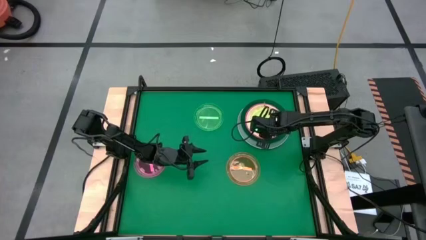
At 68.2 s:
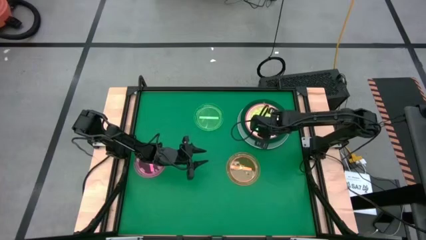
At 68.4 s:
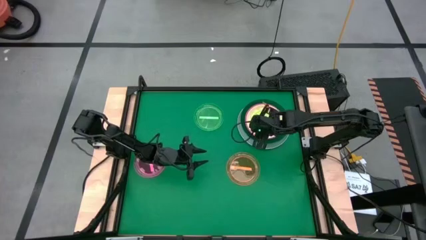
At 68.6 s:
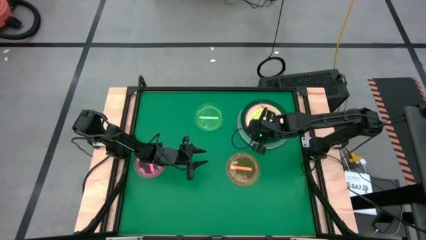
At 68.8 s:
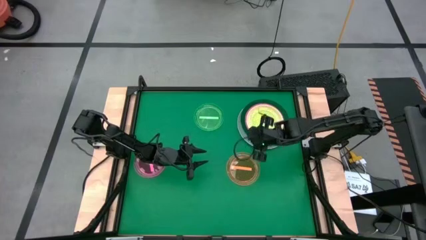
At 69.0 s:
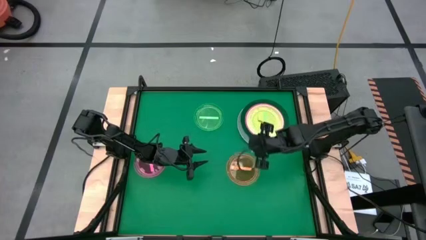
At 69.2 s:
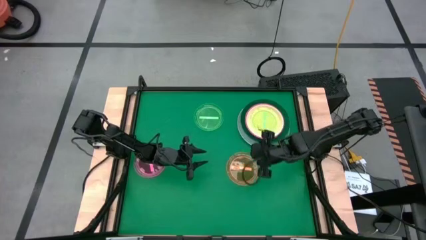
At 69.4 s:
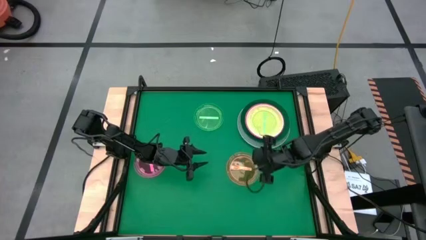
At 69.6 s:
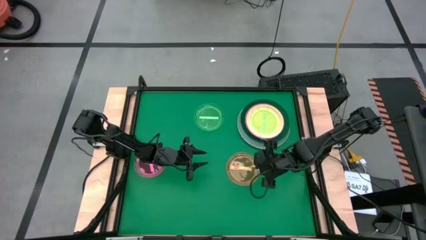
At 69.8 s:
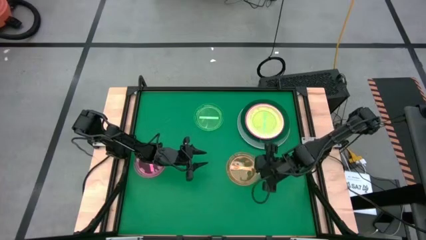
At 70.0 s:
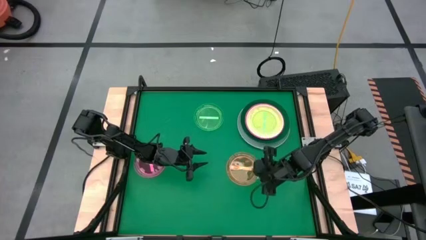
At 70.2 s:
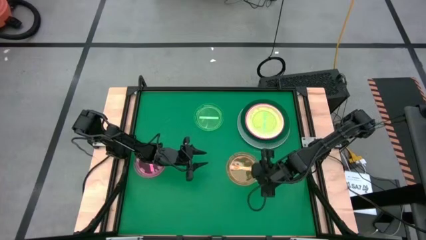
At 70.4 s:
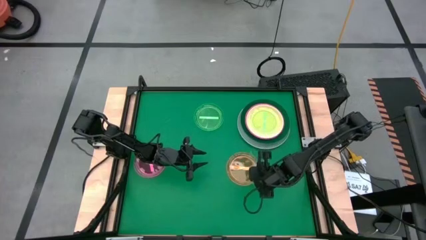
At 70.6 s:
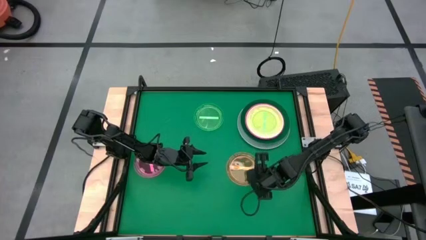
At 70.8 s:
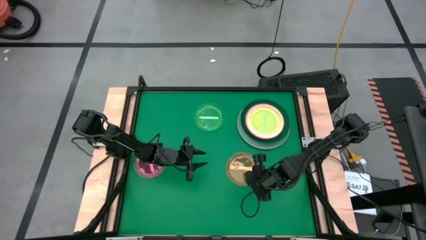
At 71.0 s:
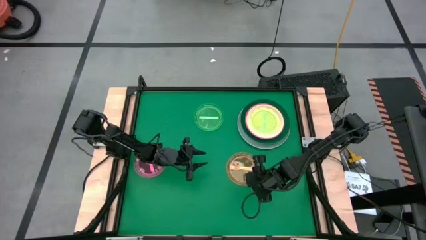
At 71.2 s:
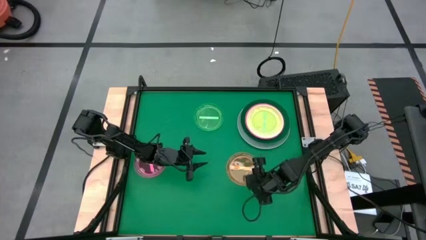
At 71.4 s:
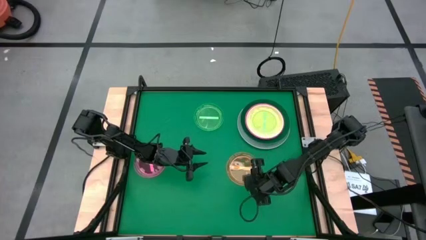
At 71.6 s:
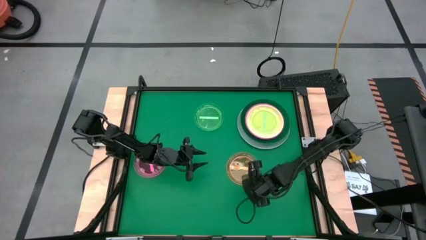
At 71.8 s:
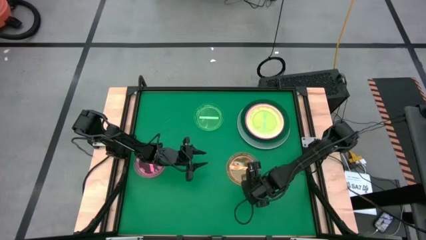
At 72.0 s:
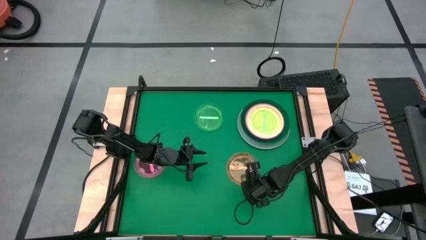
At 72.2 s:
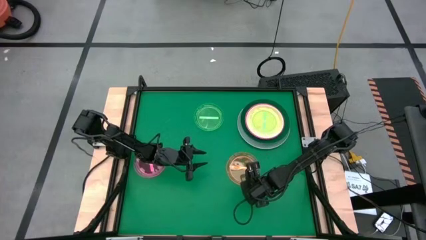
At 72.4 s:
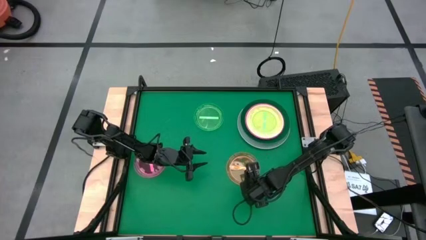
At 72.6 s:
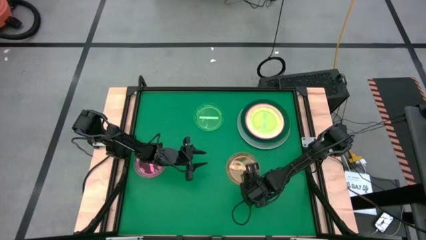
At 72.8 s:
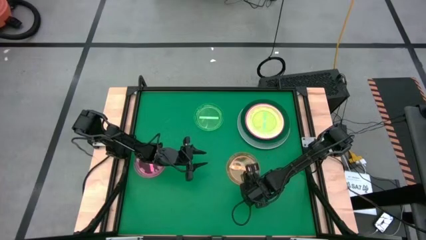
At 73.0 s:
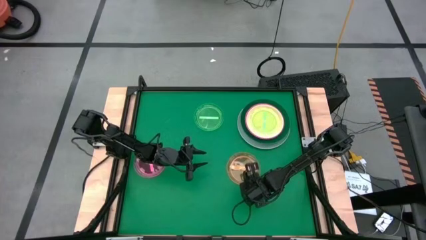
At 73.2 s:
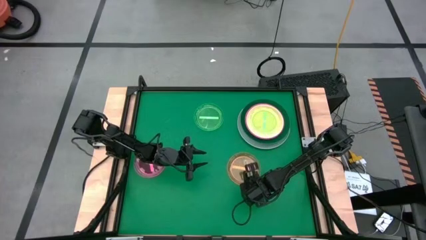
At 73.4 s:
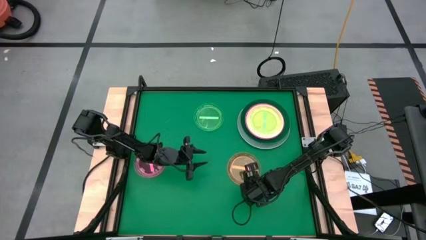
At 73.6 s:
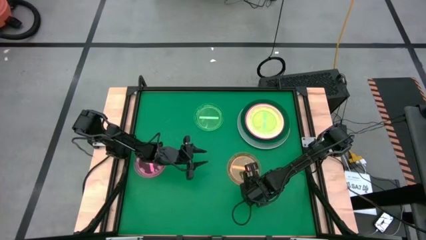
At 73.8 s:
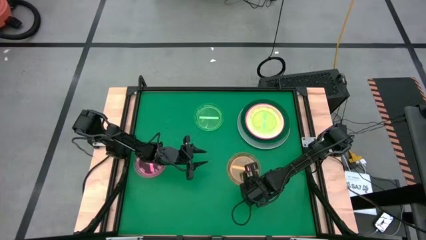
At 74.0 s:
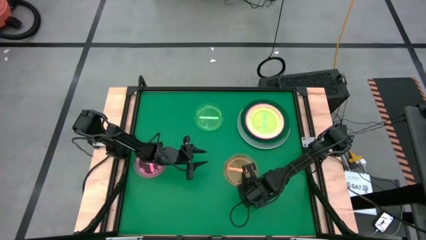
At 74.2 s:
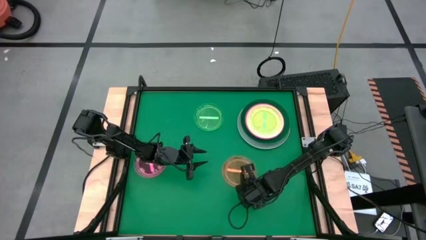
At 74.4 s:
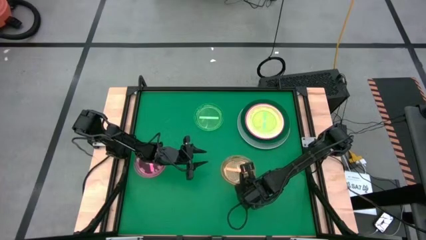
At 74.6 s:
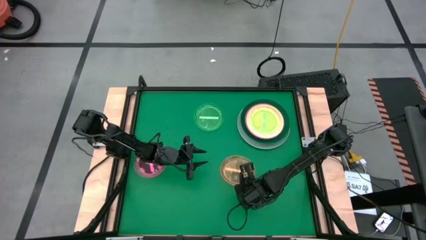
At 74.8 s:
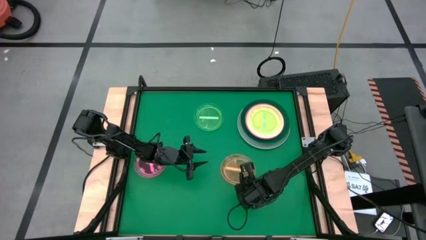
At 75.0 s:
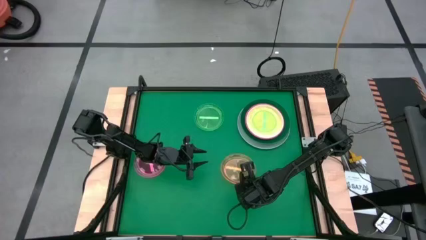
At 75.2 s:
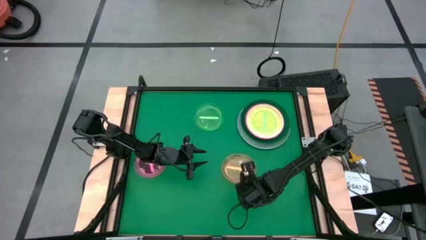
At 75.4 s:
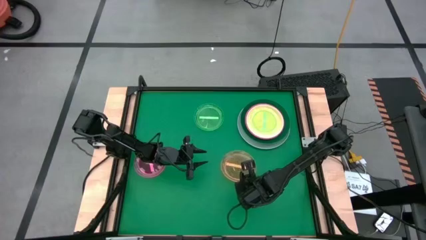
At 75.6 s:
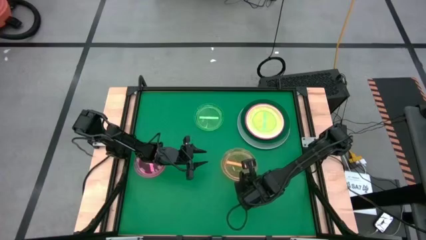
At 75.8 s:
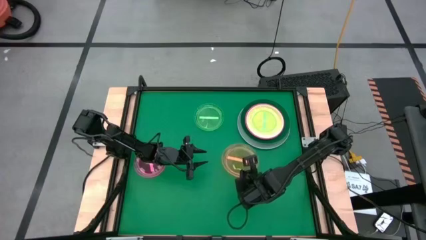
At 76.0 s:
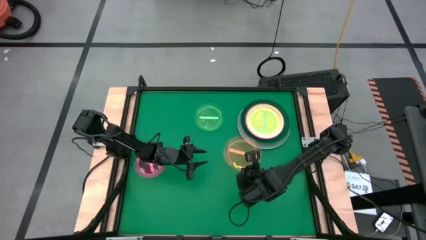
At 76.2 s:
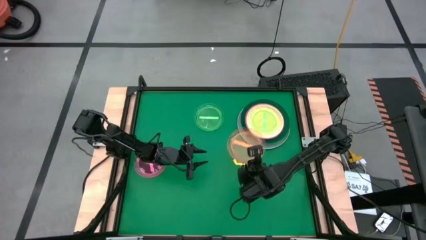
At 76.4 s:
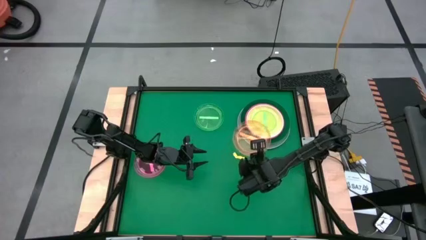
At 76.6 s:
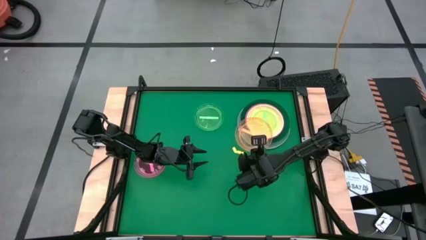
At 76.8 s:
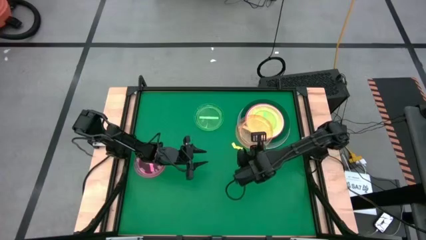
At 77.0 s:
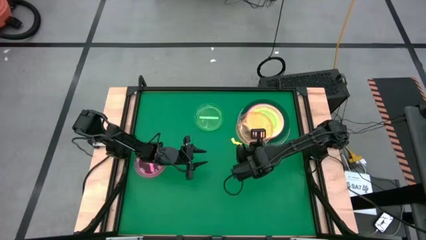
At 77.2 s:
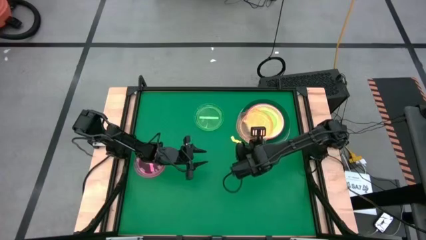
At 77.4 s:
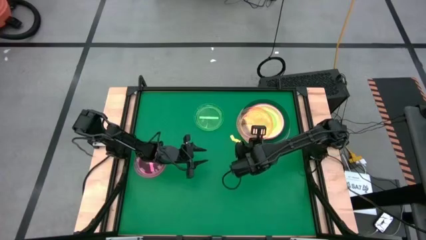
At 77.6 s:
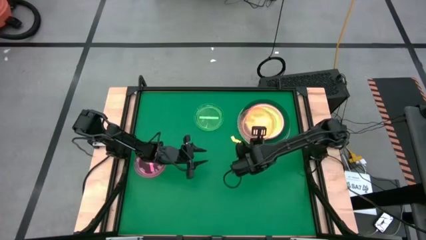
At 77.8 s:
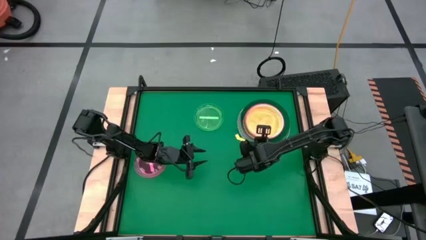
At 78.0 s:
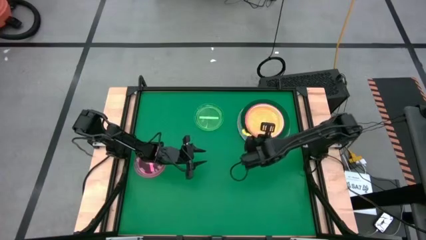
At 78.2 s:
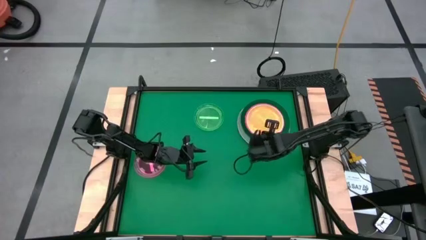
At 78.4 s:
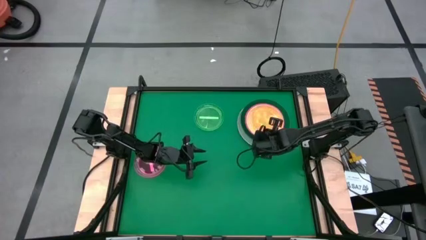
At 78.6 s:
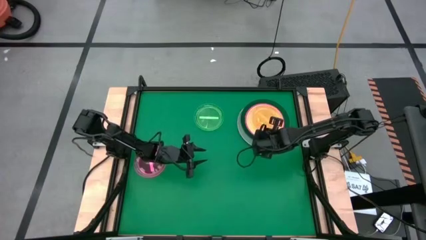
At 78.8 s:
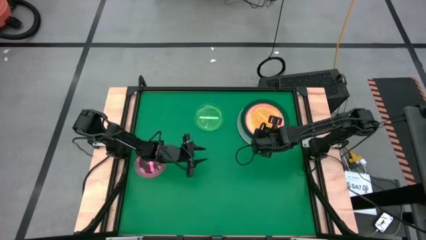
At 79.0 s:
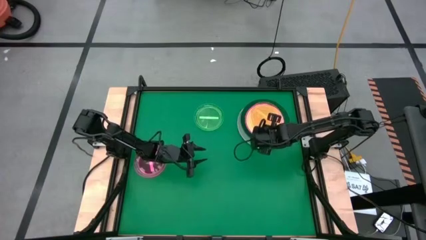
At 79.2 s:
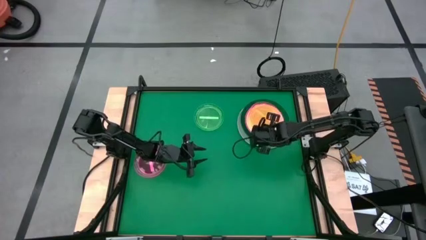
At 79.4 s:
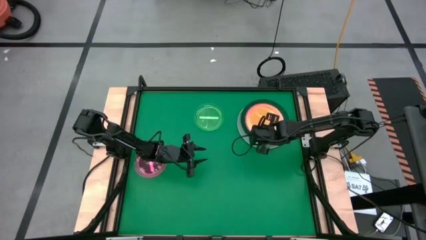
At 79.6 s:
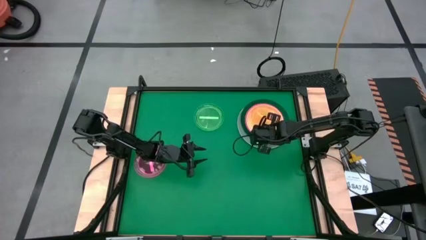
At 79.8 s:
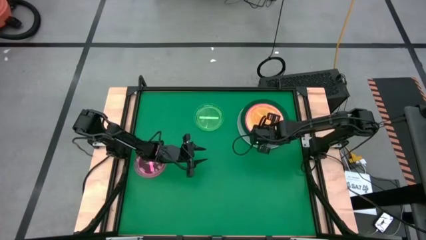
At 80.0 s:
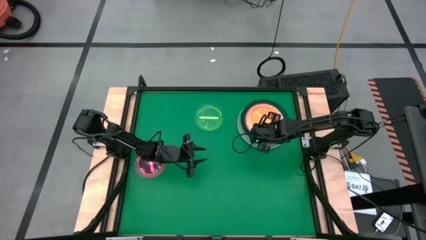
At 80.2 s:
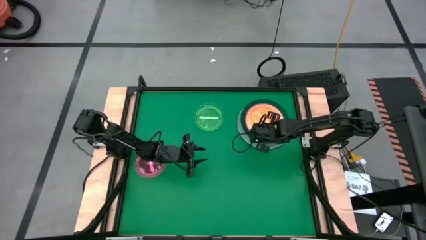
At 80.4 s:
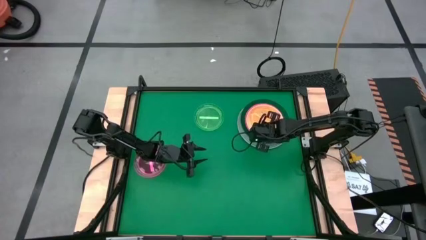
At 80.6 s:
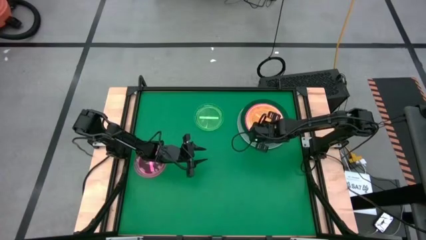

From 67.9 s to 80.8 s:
Task: Stack plastic plates
Stack the orange transparent plate on the green transparent plate
